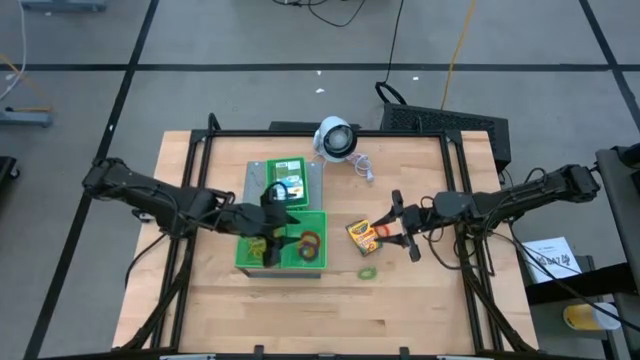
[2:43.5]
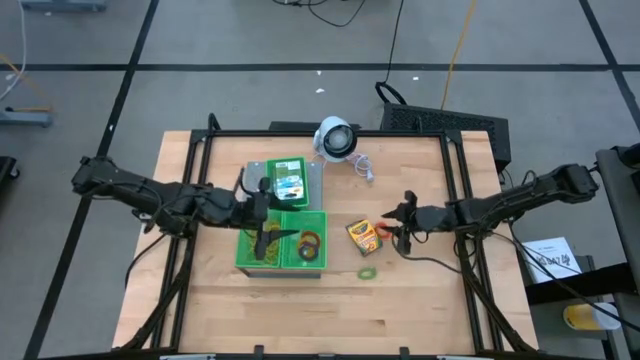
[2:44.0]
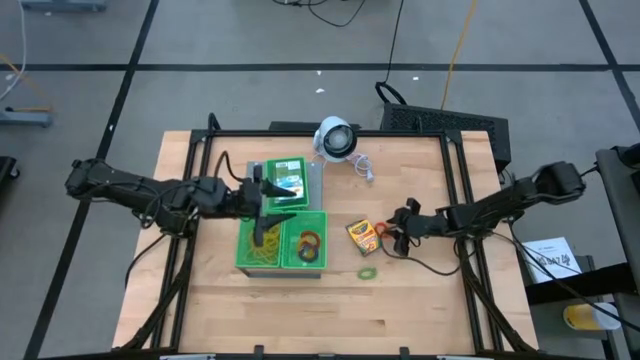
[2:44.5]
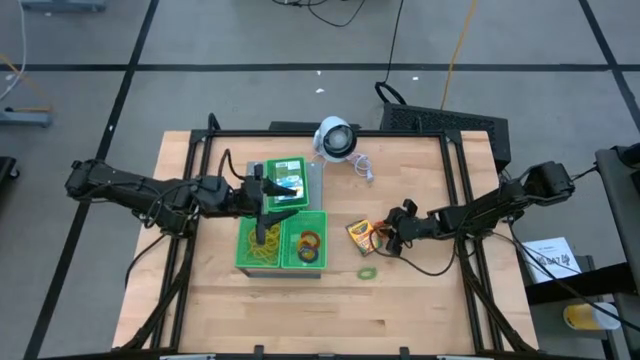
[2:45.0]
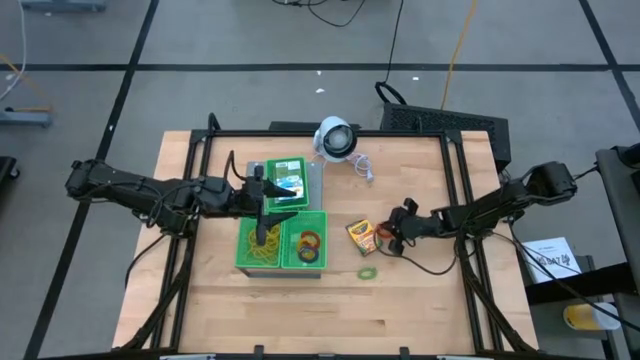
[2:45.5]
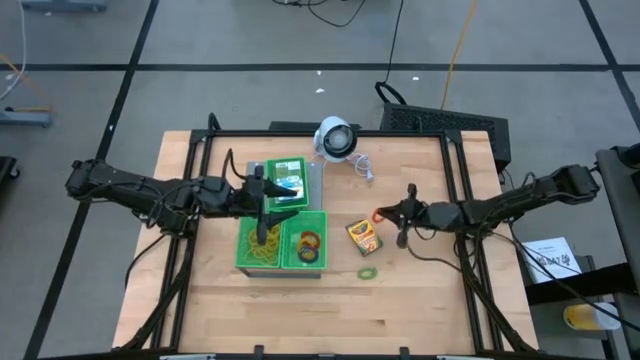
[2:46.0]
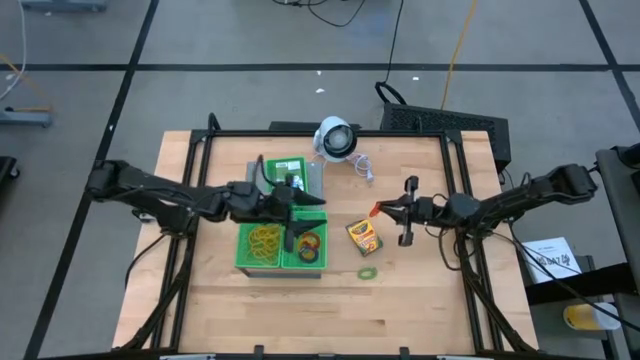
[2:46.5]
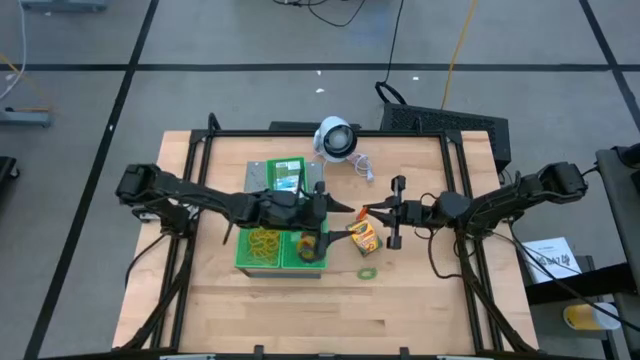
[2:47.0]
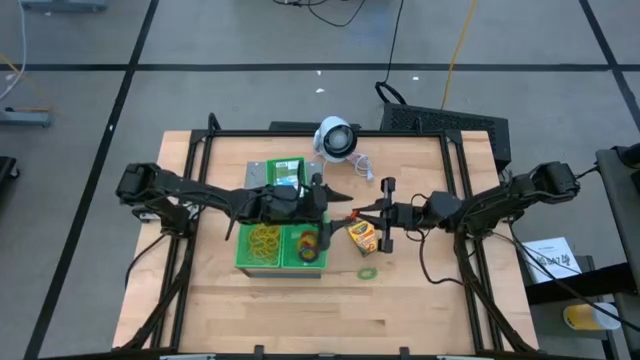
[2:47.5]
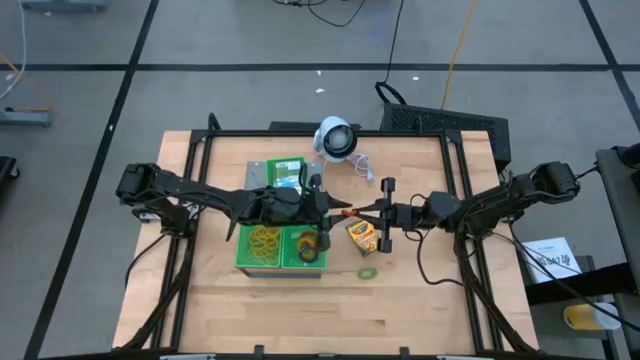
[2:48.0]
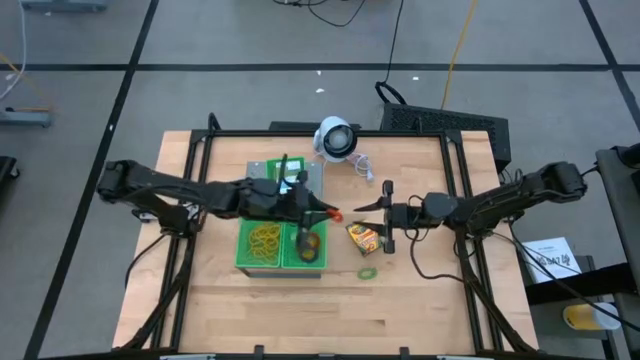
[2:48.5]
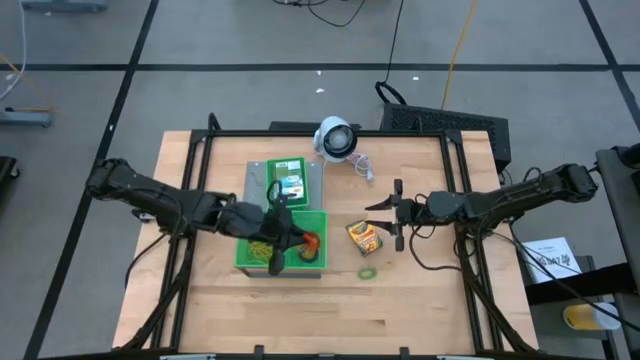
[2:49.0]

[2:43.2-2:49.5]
Task: Pick & Place Office Desk Supplies
Put the orange spring keychain into the bottom right basket on the shelf

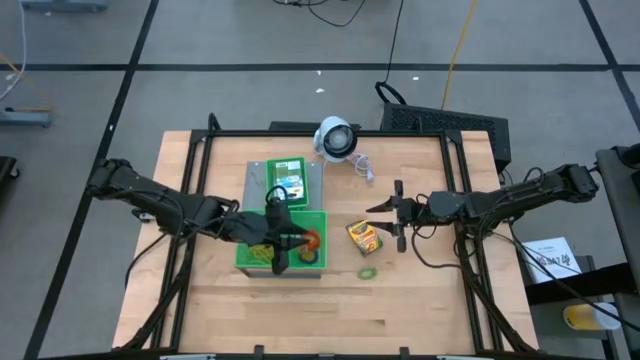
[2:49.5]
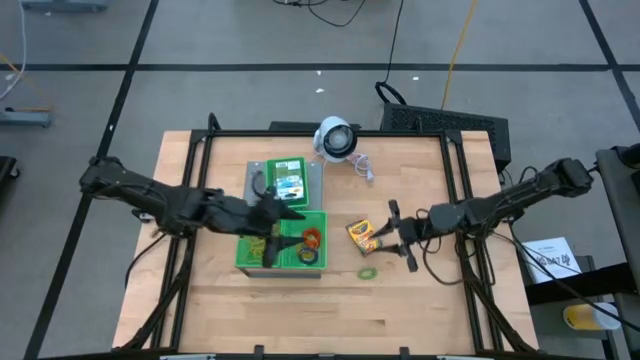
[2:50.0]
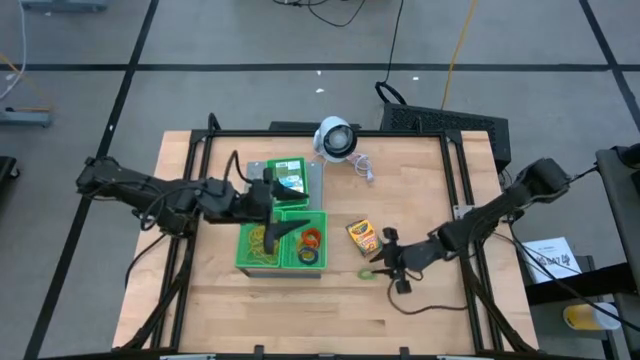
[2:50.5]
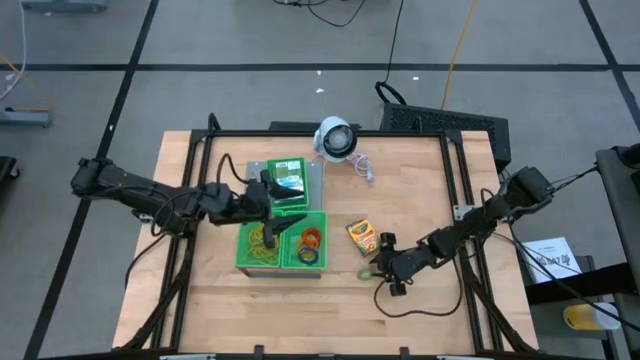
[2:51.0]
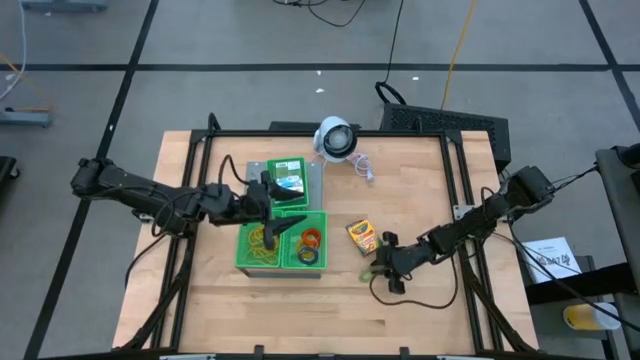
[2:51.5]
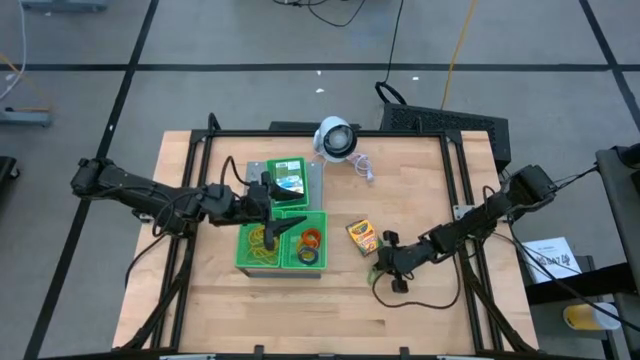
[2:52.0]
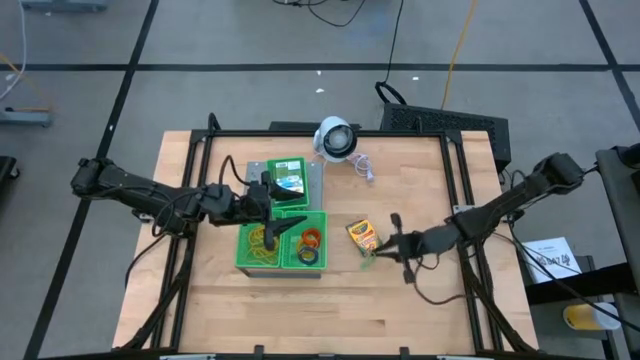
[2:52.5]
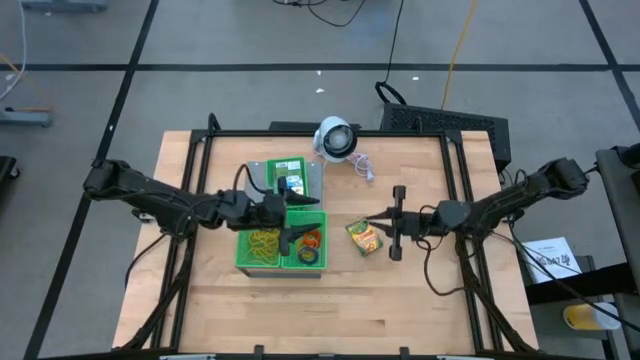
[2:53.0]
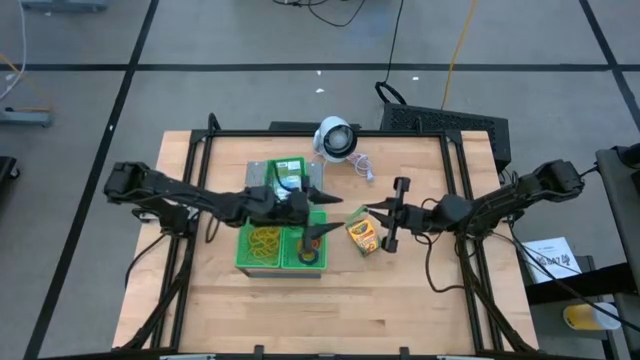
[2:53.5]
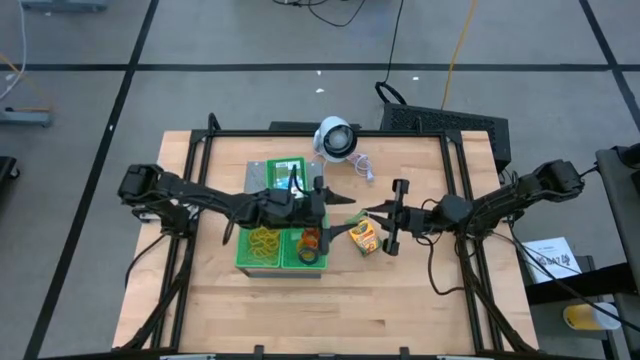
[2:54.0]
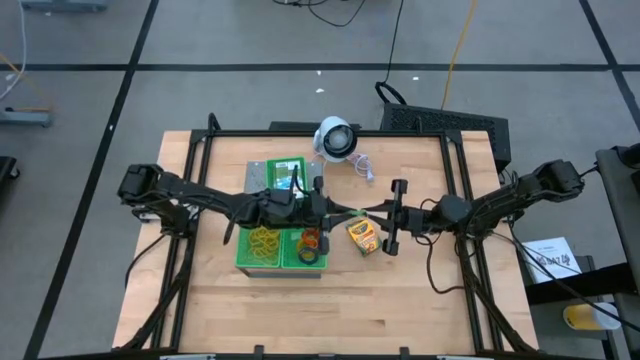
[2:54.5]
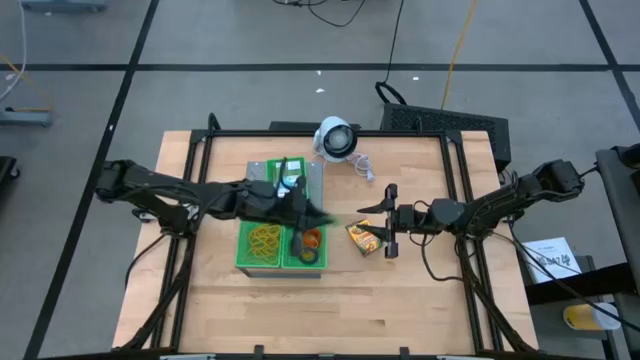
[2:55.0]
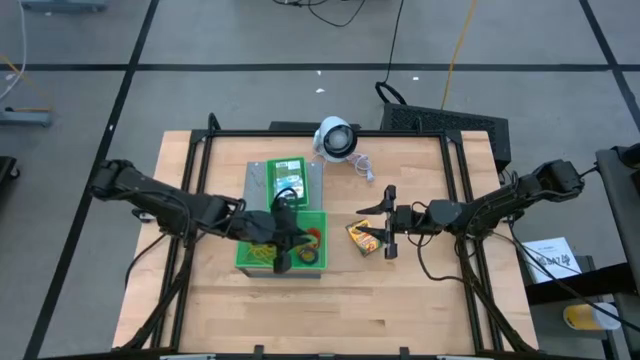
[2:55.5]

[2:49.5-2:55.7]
Put the green spring keychain into the bottom right basket on the shelf

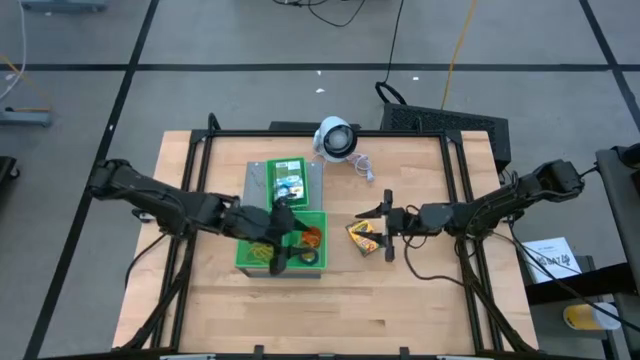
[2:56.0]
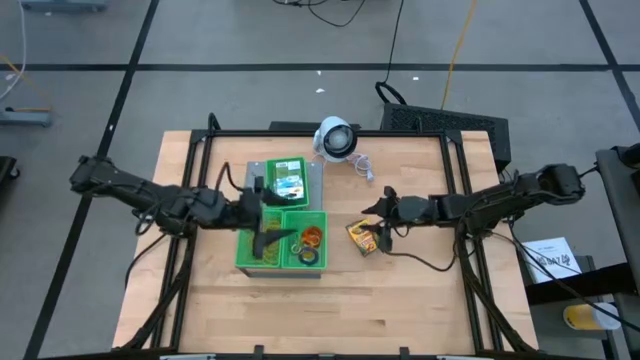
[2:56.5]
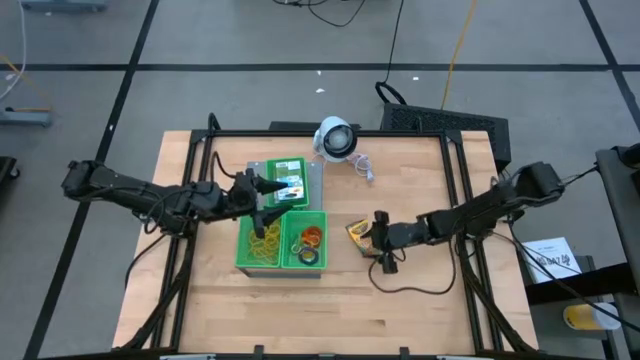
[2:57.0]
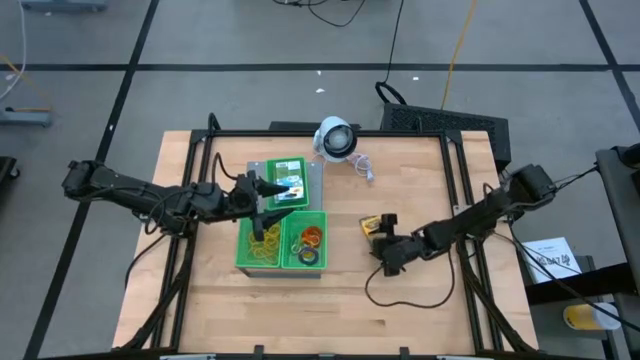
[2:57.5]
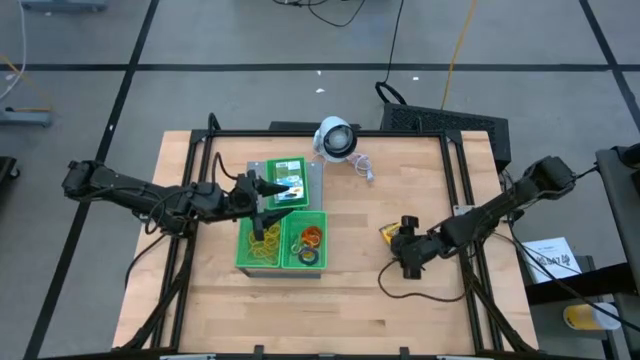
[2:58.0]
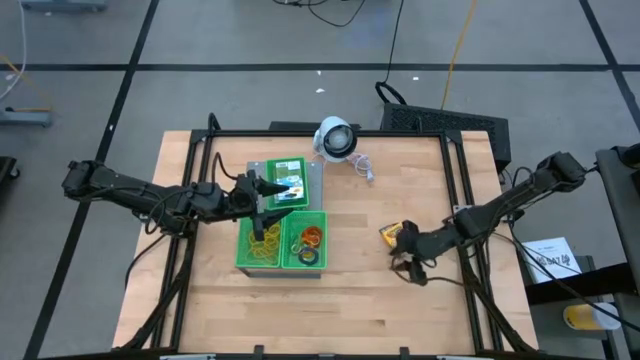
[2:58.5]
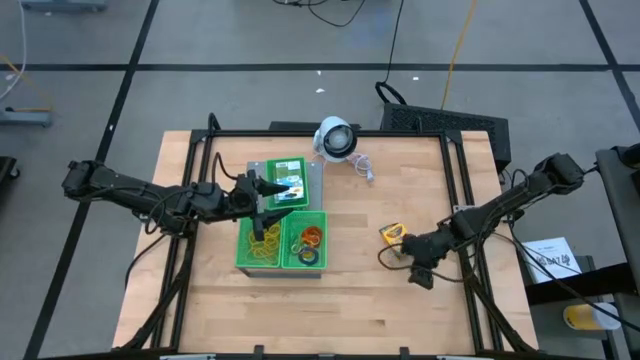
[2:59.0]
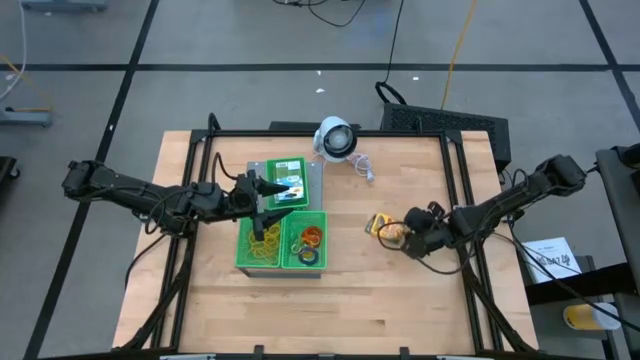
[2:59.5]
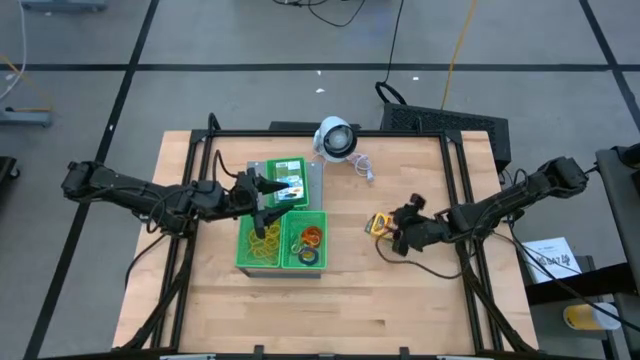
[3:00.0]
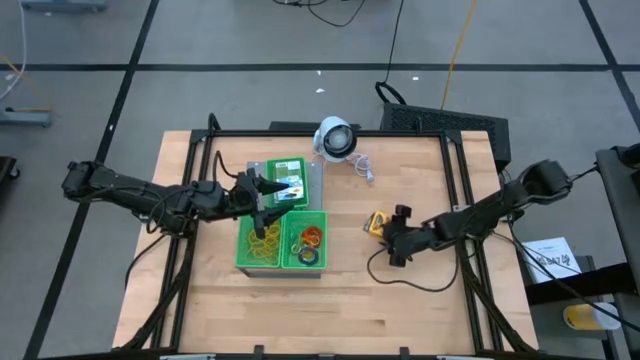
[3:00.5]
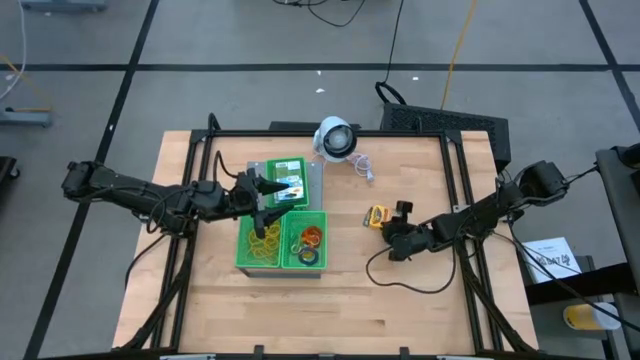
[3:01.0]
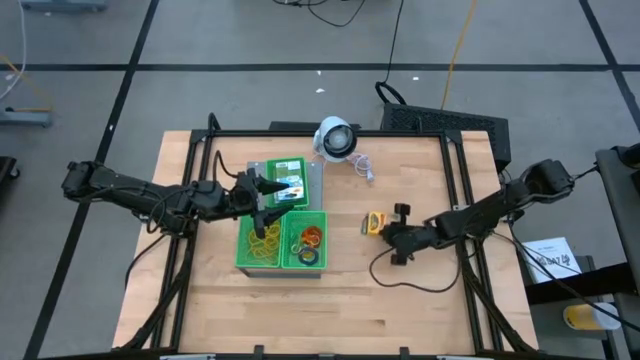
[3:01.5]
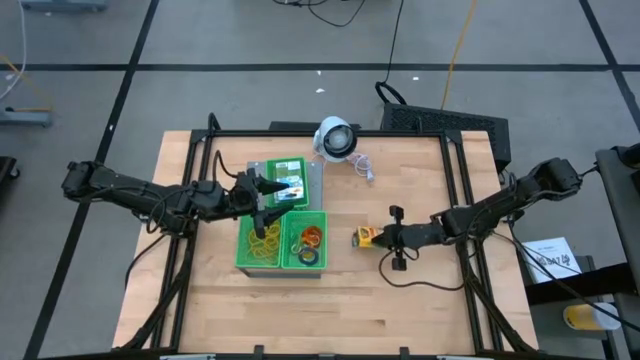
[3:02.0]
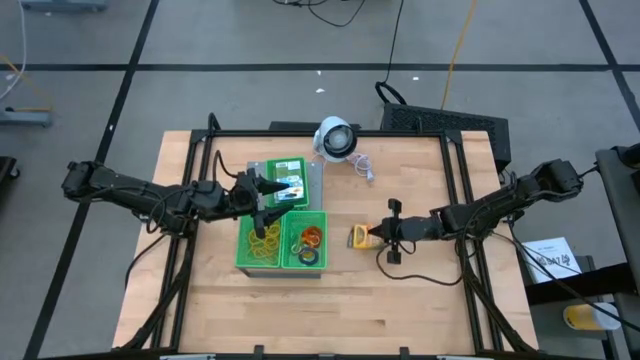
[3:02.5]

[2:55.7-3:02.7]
Put the crayons into the top green basket on the shelf

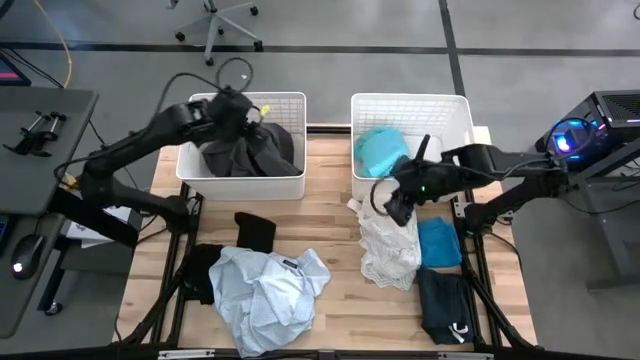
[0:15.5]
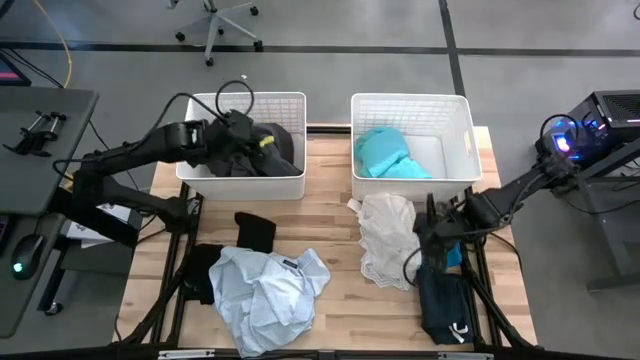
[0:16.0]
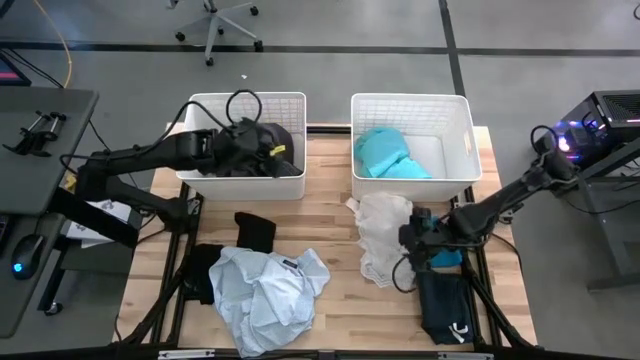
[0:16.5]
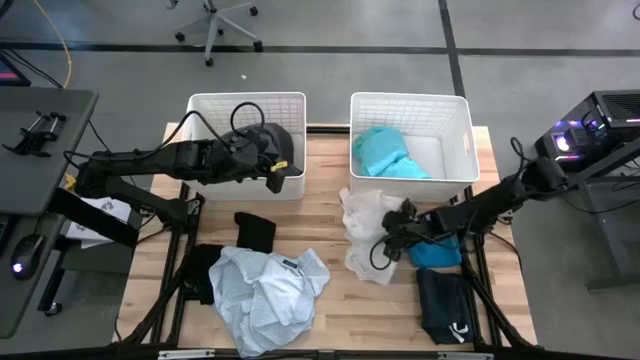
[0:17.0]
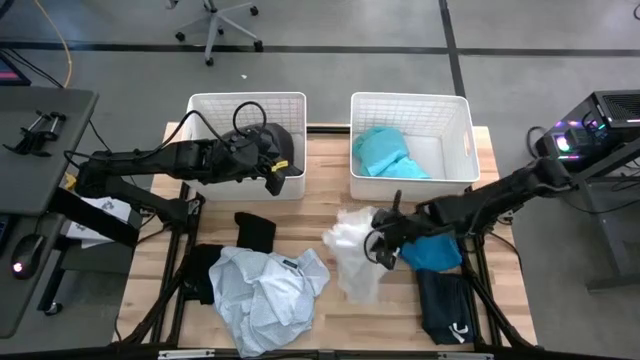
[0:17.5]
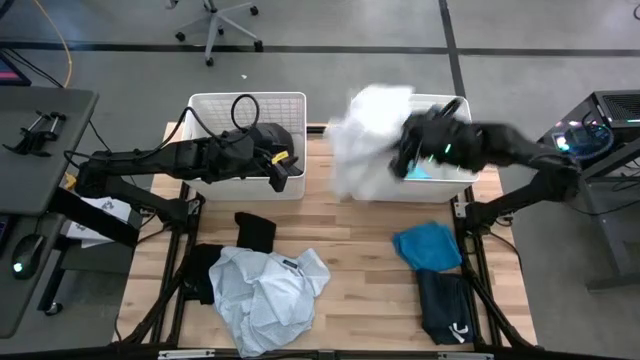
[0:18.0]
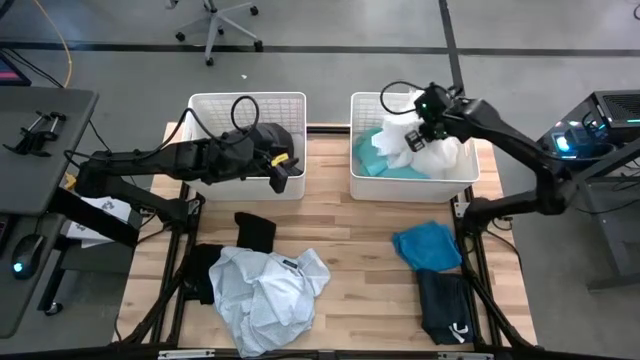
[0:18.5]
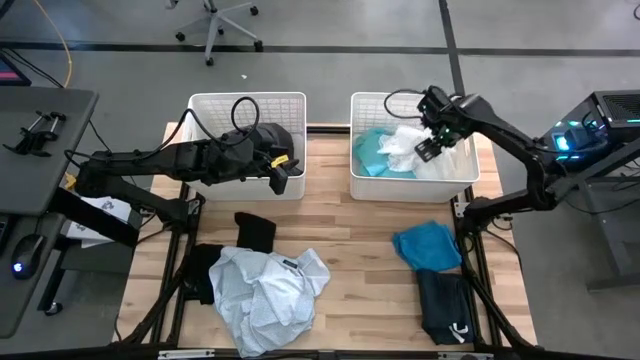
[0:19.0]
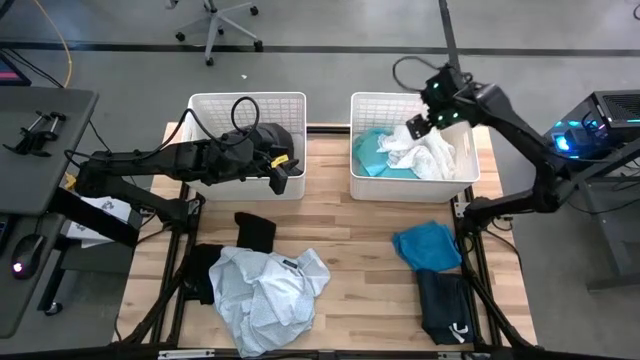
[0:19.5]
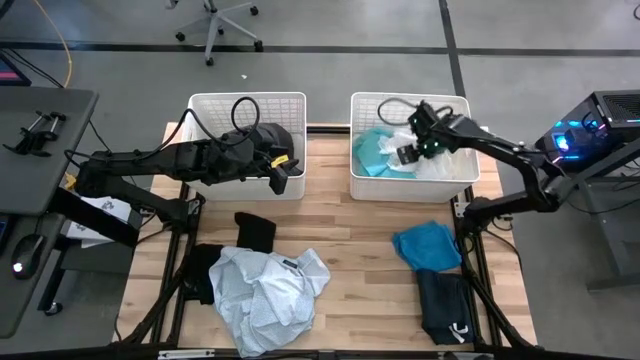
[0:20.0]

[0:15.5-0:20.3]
Task: Sort clothes
Put the white blouse into the right white bin
